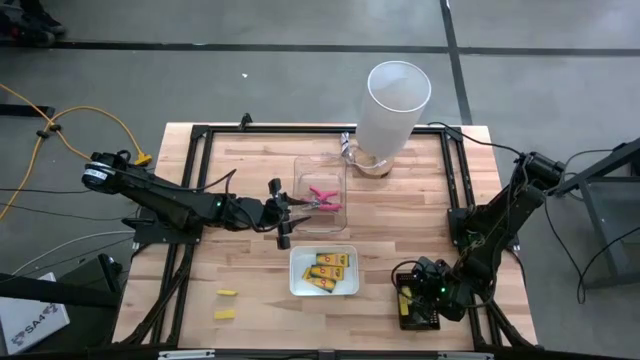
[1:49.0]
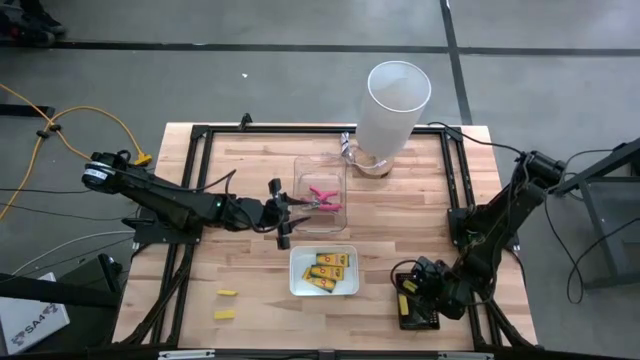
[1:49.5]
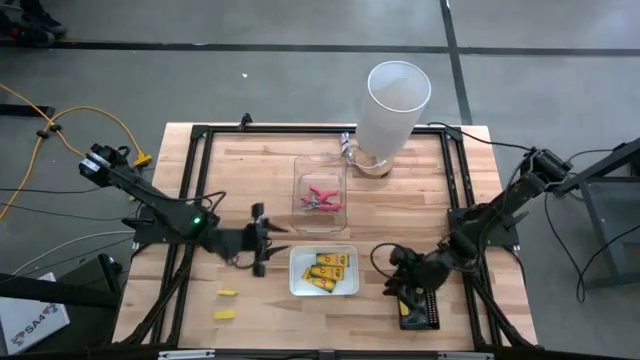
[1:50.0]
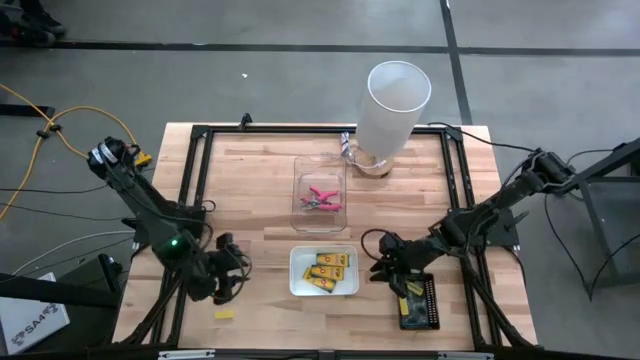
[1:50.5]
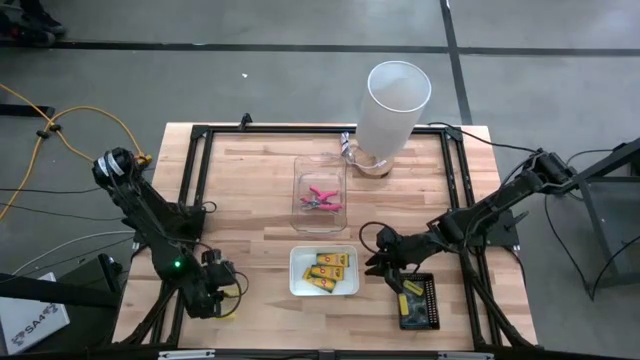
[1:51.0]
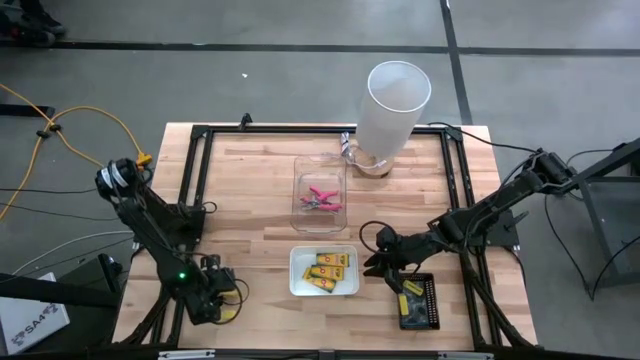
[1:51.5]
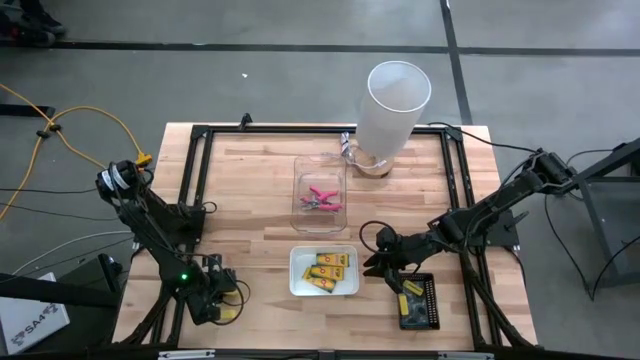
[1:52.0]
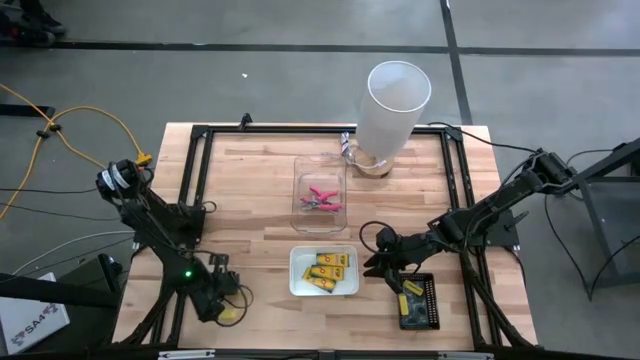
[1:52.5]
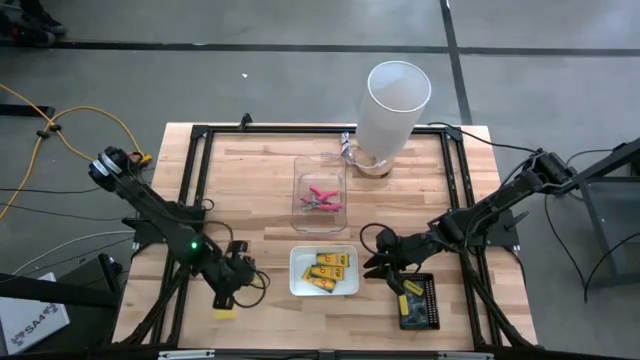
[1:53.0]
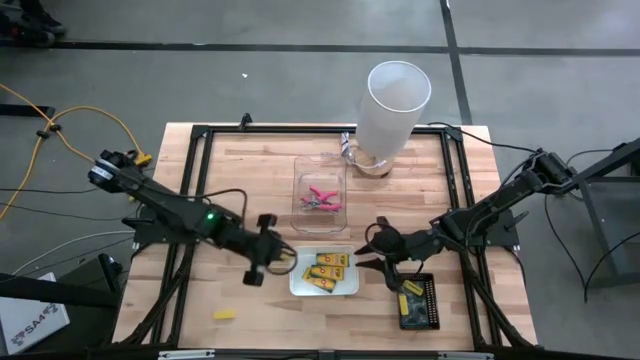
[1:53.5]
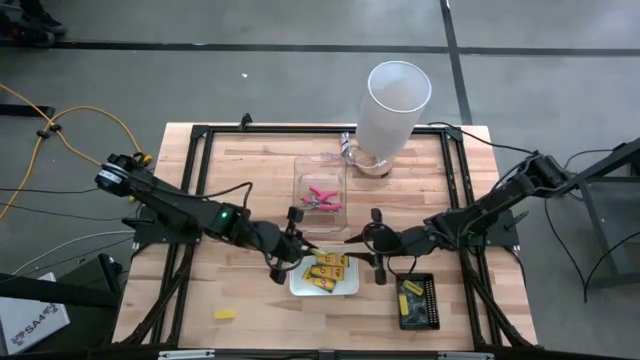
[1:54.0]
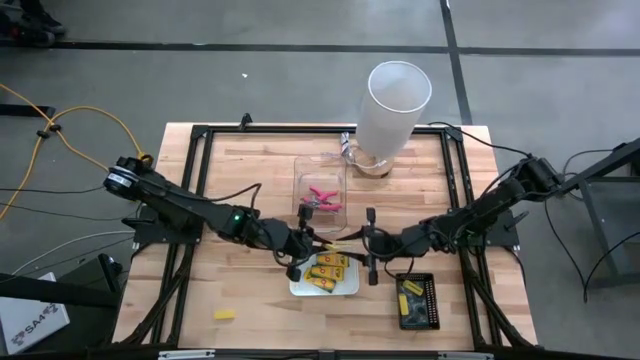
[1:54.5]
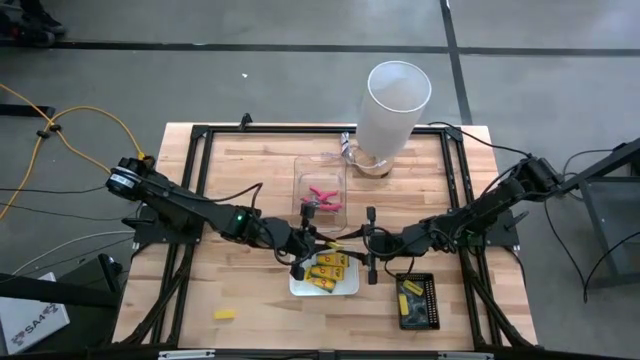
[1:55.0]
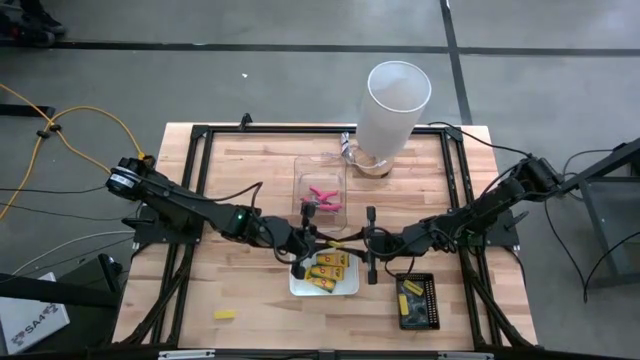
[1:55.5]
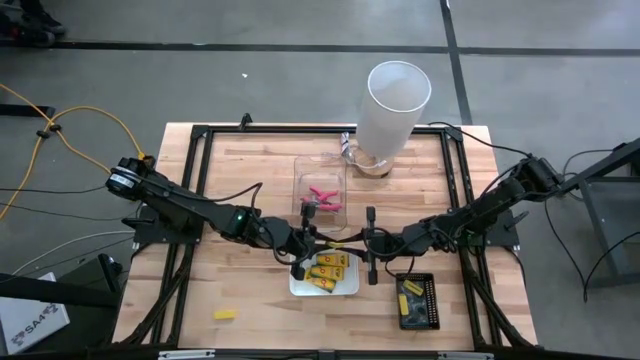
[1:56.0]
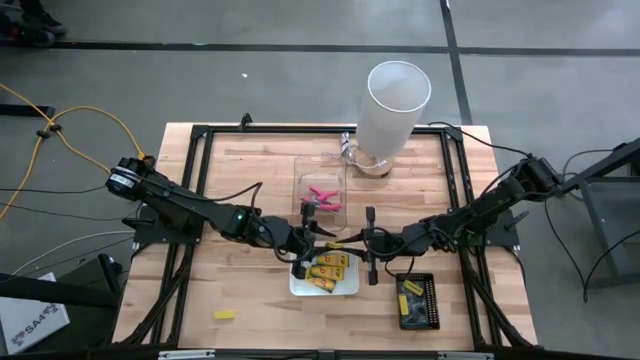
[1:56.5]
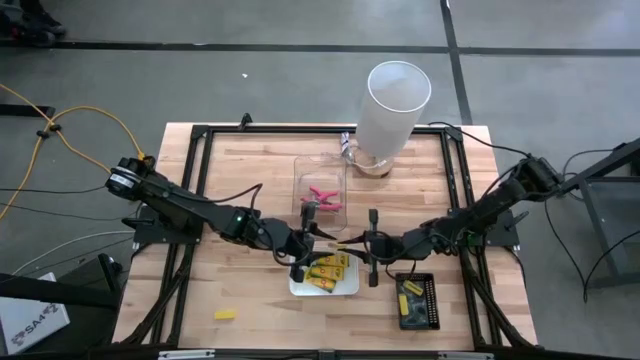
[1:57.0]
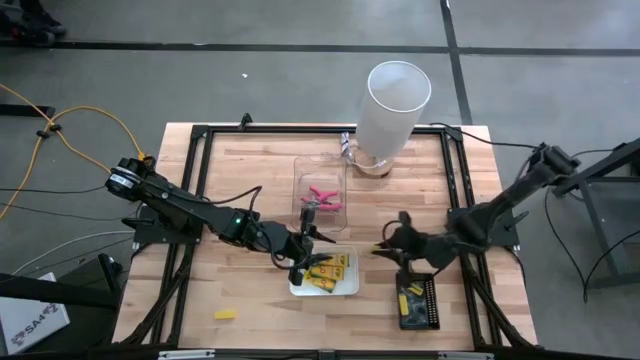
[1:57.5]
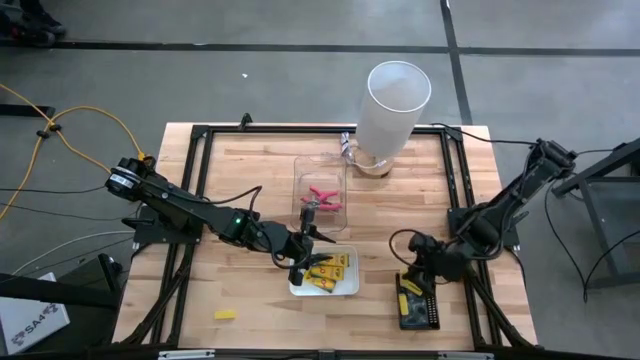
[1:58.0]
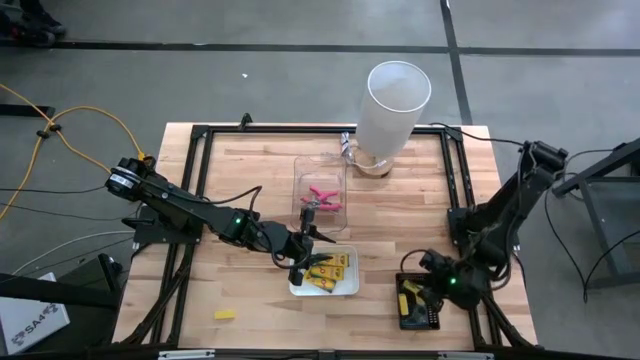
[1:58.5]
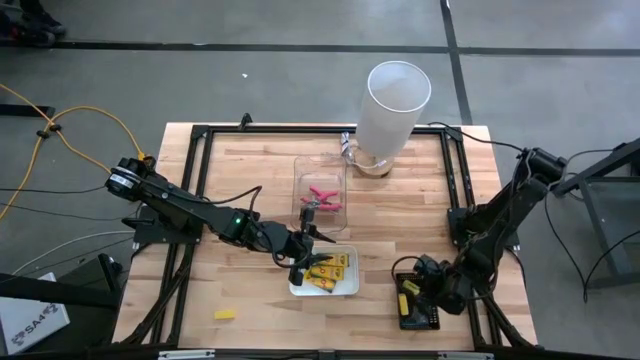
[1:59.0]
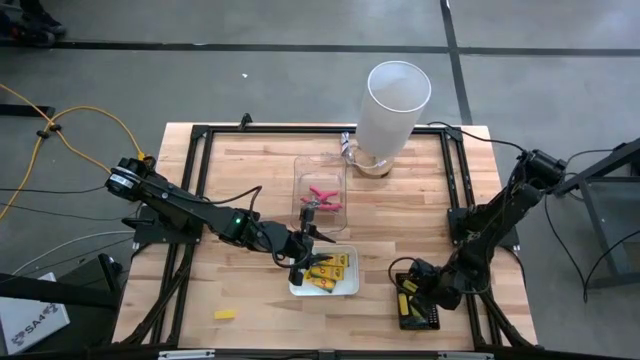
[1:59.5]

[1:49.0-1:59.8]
Task: Pick & Place School Supplies
Put the yellow eraser into the black bin

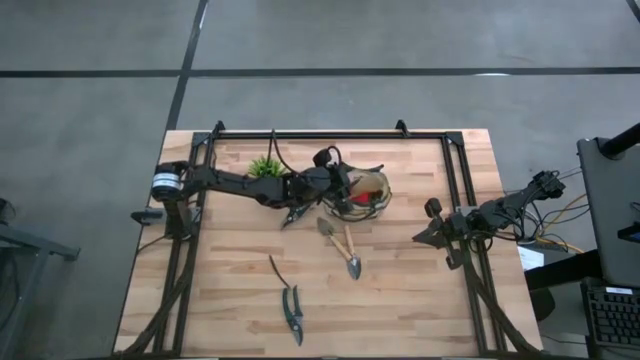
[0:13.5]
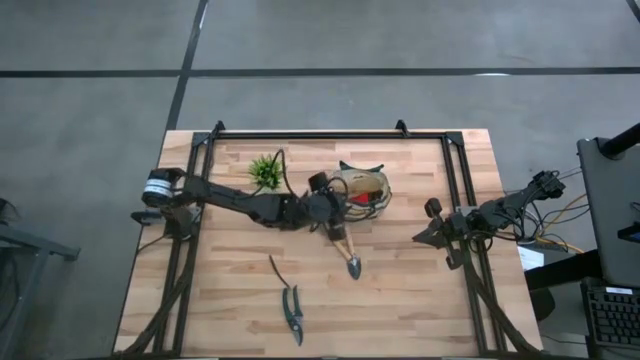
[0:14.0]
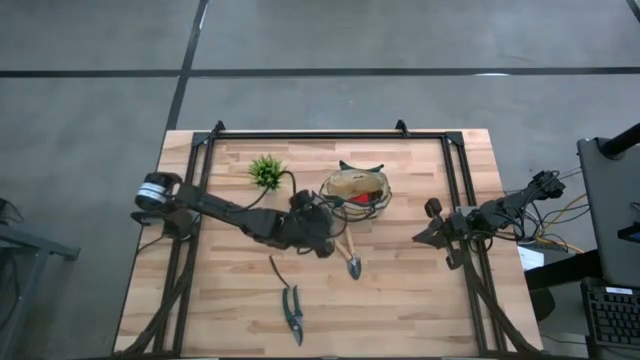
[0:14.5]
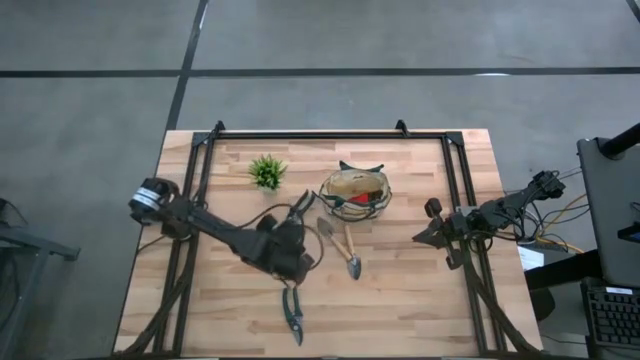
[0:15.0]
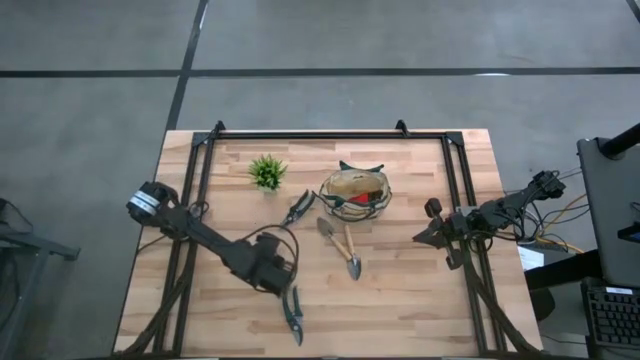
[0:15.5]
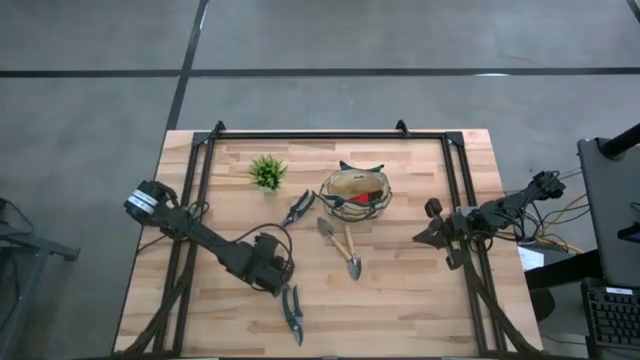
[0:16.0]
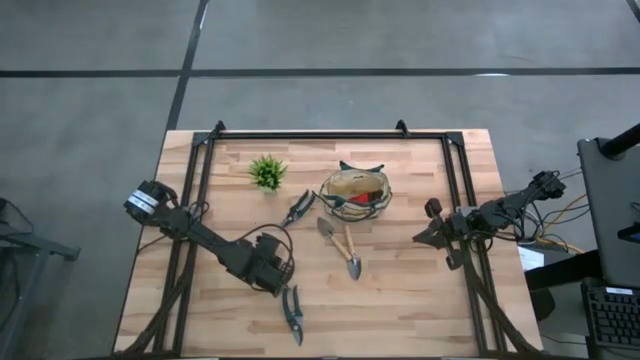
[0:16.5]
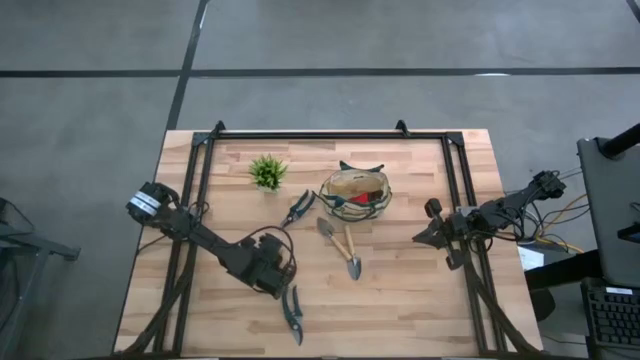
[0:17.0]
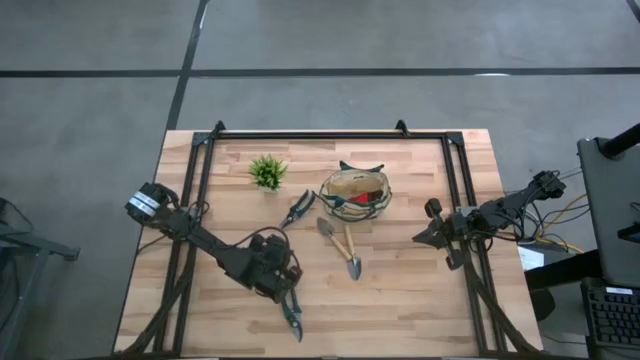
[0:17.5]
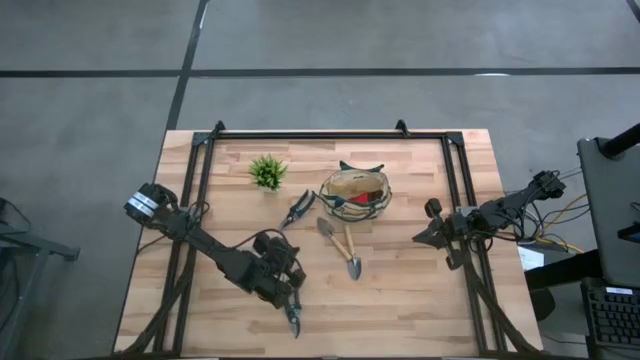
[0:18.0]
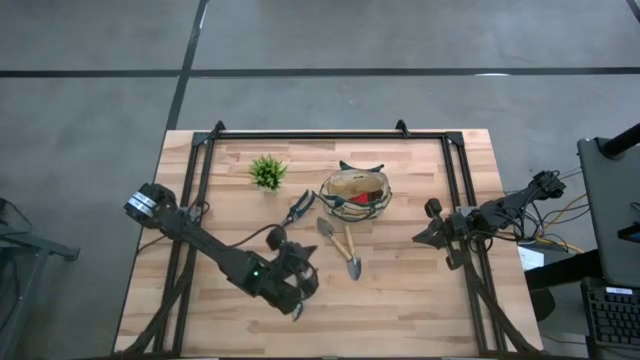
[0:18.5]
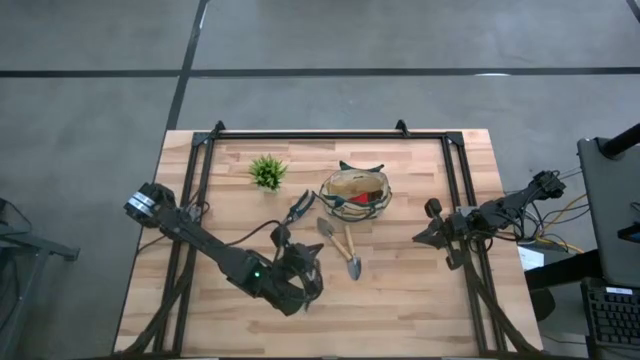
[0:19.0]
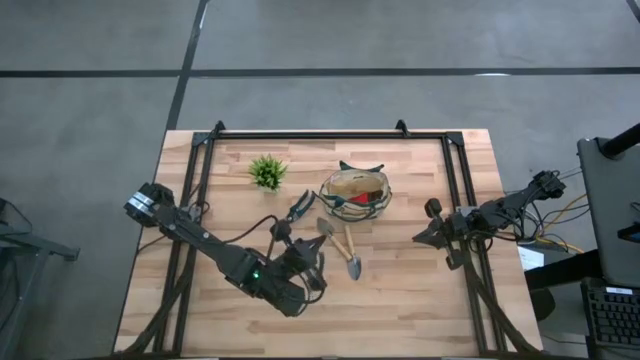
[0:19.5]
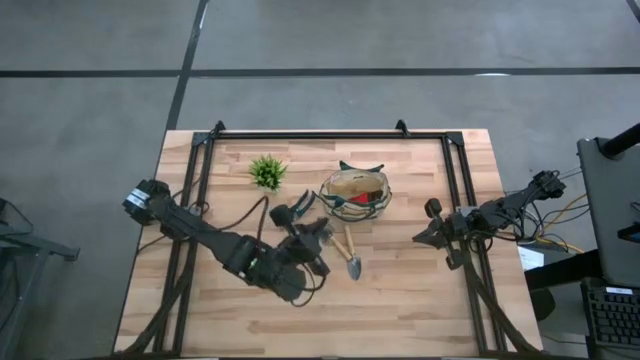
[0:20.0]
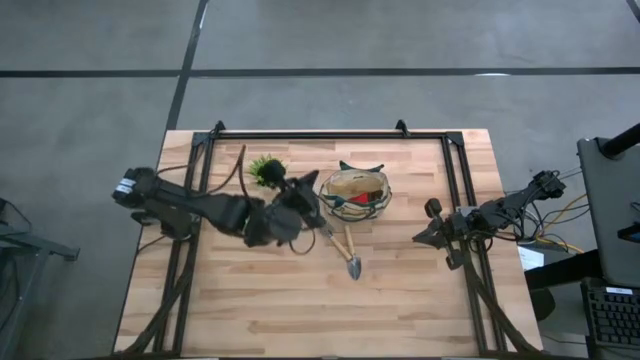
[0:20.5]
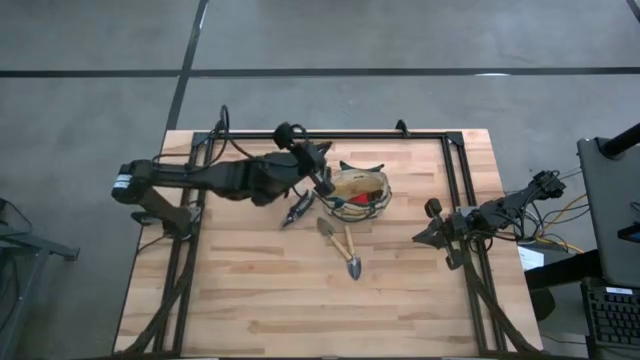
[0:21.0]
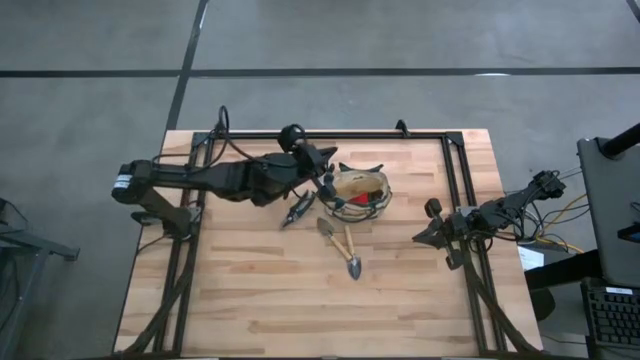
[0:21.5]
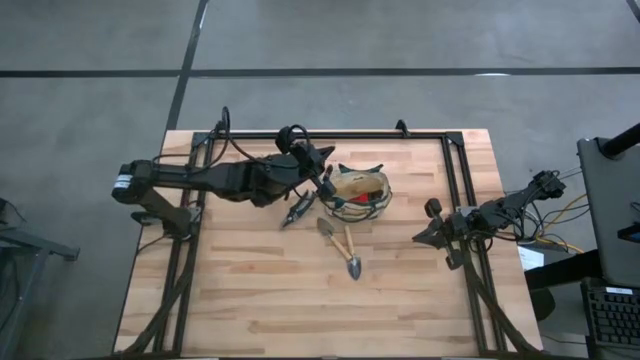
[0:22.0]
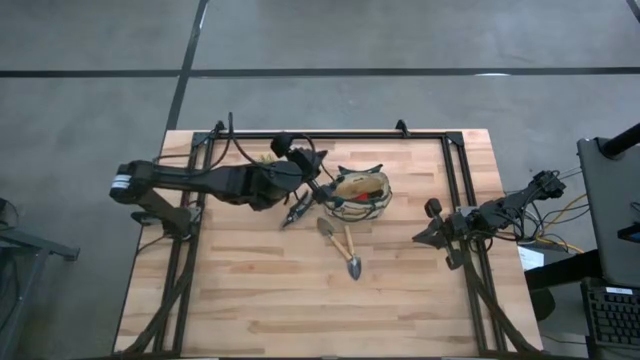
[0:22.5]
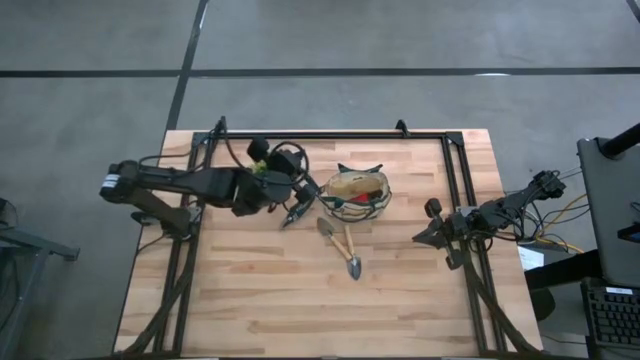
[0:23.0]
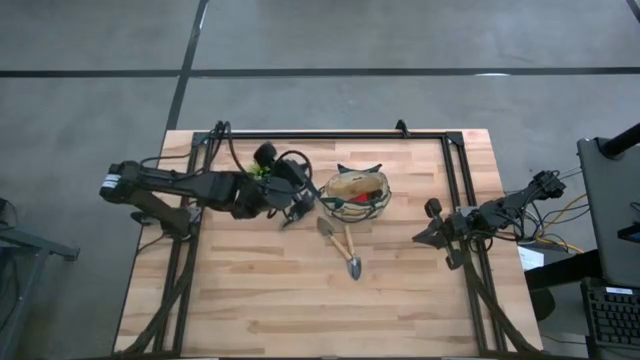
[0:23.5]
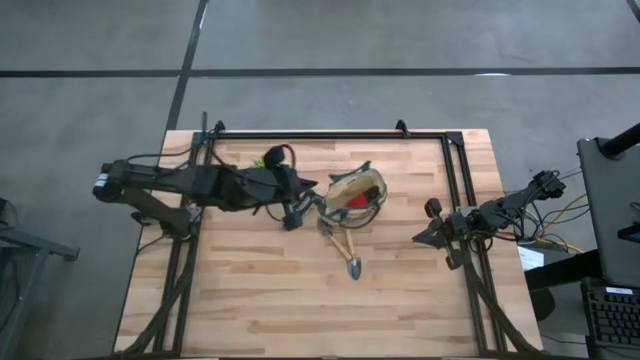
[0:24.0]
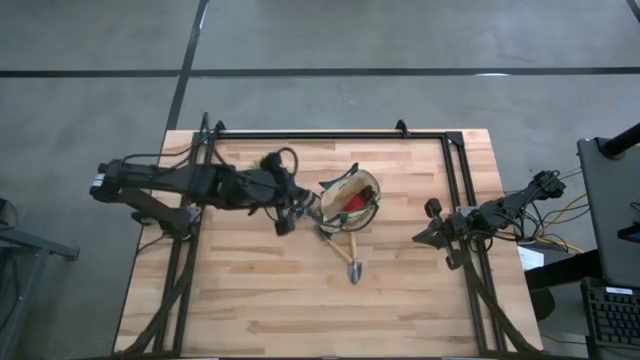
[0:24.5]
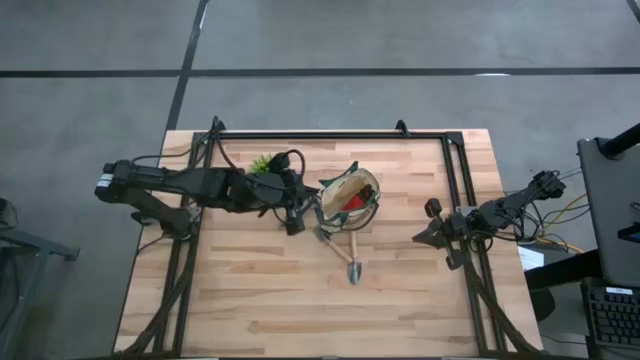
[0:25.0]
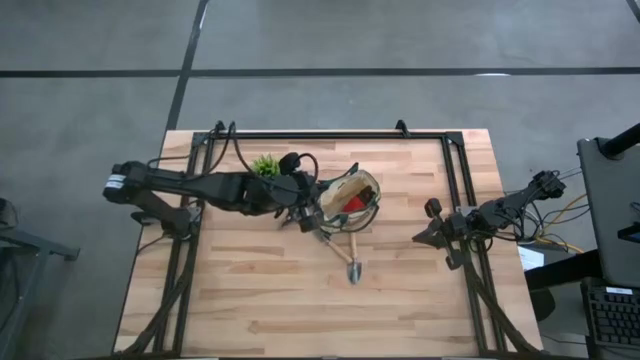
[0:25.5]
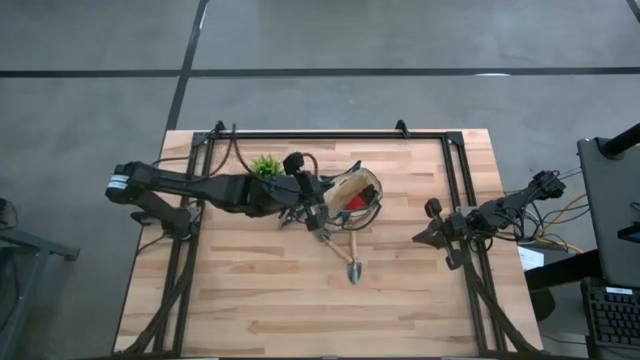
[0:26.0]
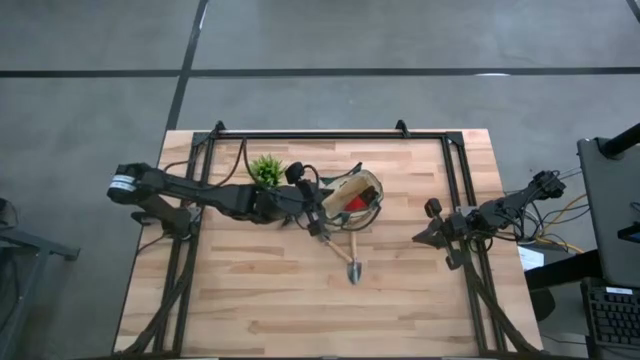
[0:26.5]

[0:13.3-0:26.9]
Task: Pick & Place Garden tools in Gardening bag
Put the bottom green shear scissors into the gardening bag
